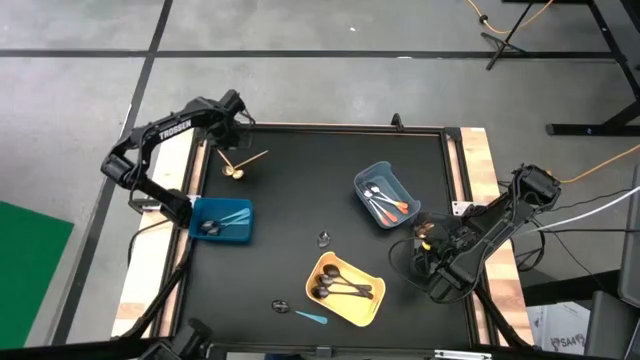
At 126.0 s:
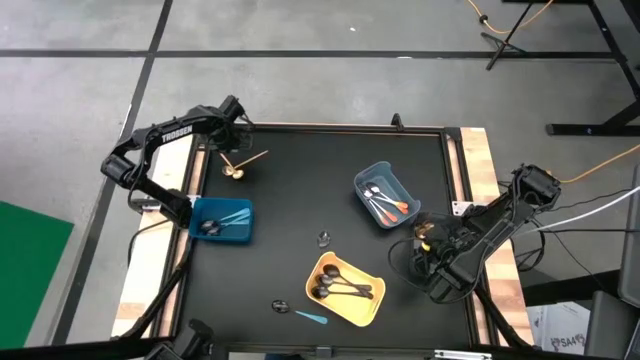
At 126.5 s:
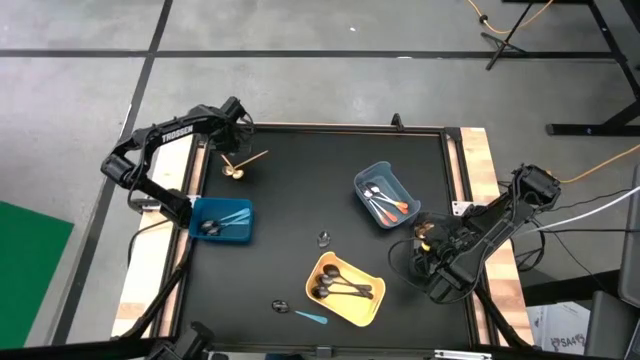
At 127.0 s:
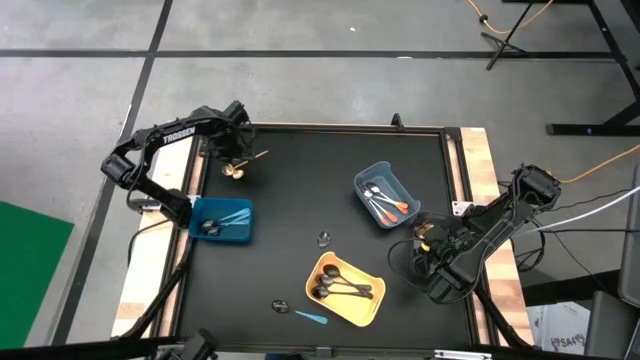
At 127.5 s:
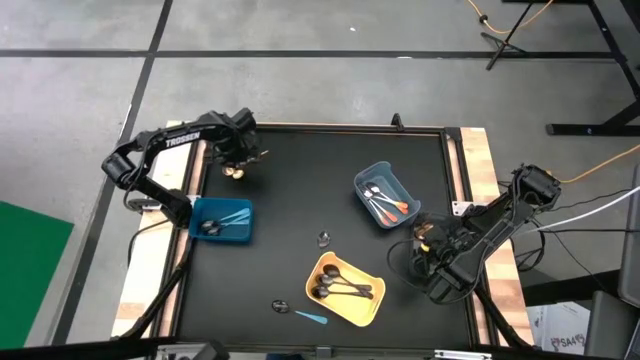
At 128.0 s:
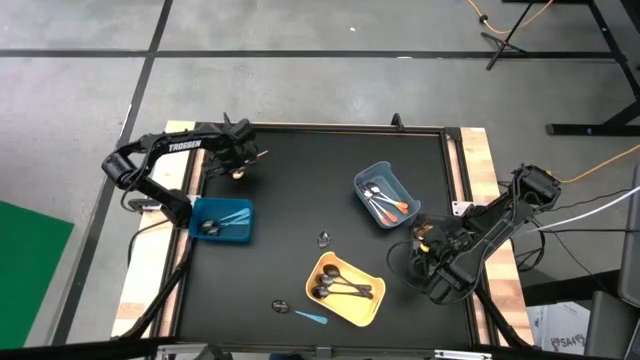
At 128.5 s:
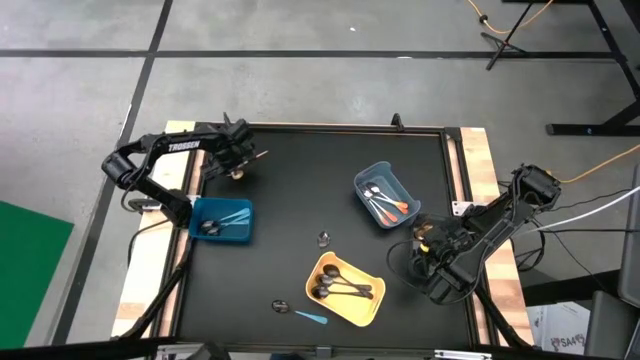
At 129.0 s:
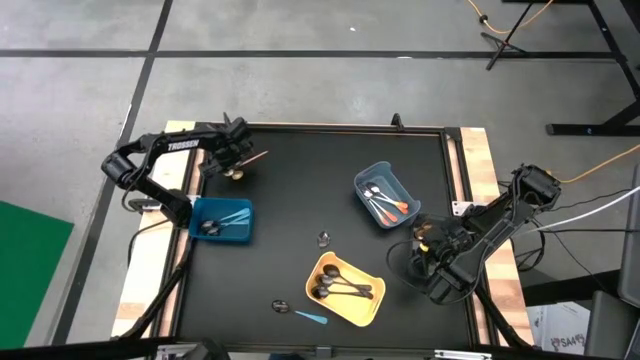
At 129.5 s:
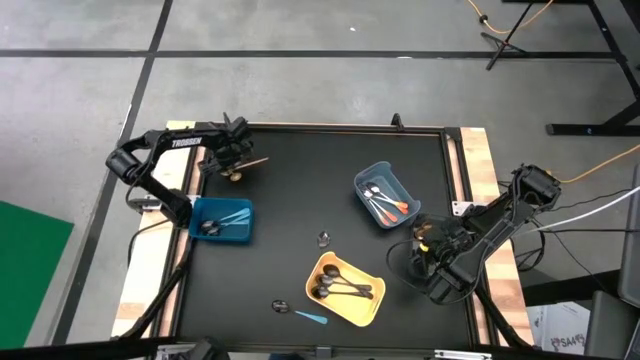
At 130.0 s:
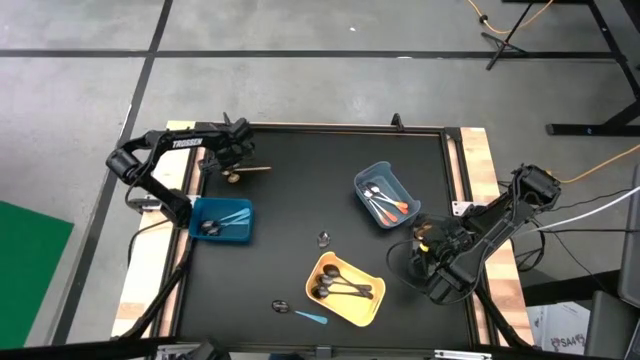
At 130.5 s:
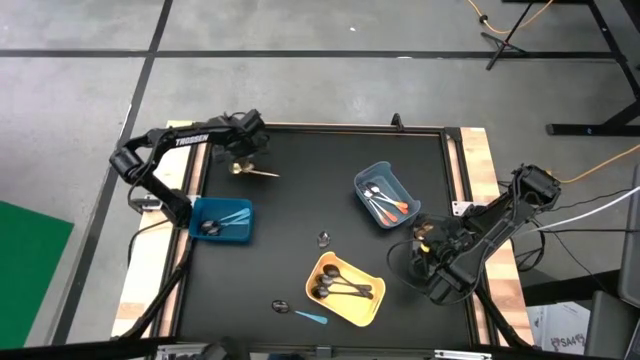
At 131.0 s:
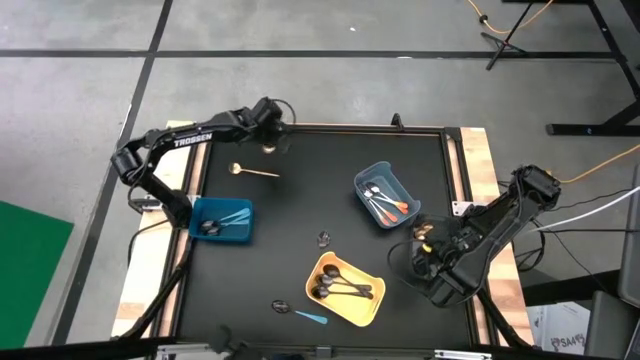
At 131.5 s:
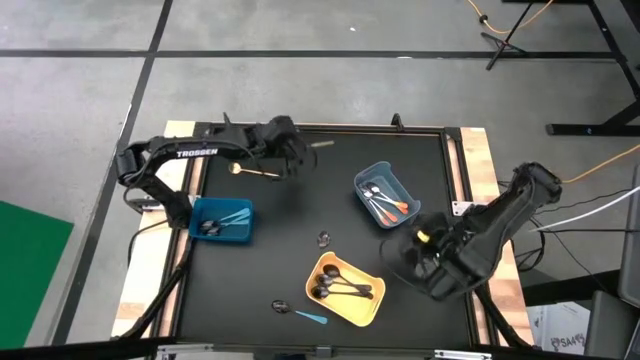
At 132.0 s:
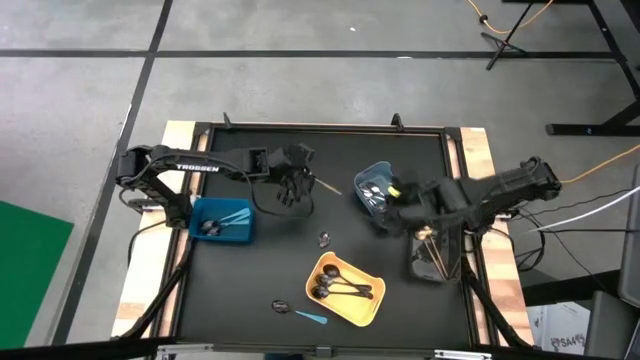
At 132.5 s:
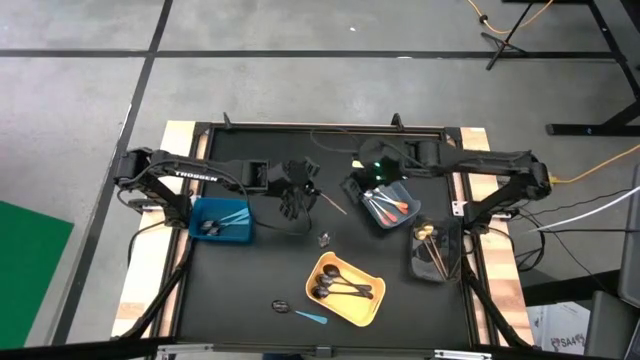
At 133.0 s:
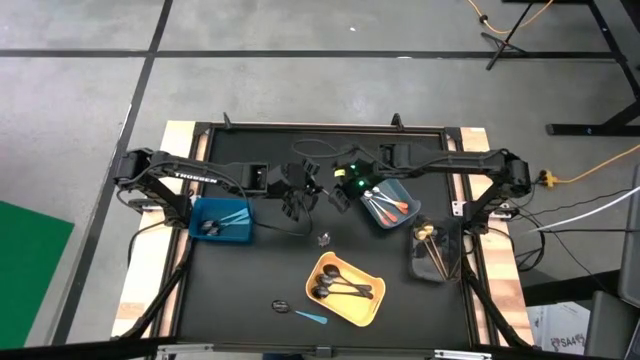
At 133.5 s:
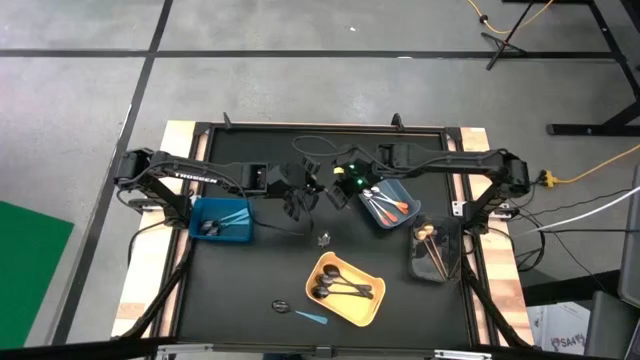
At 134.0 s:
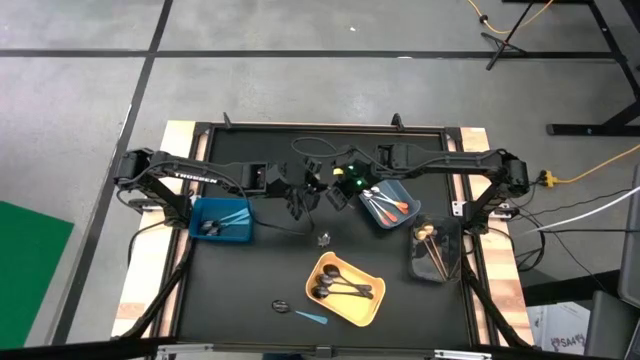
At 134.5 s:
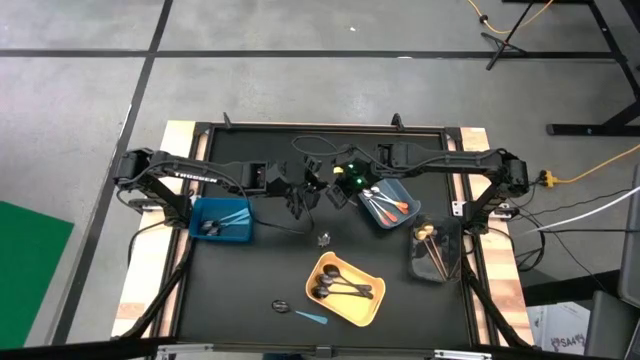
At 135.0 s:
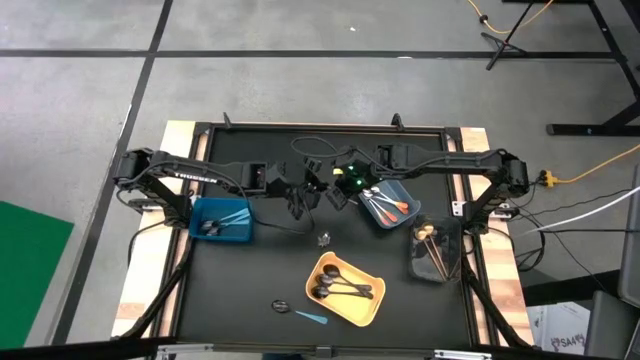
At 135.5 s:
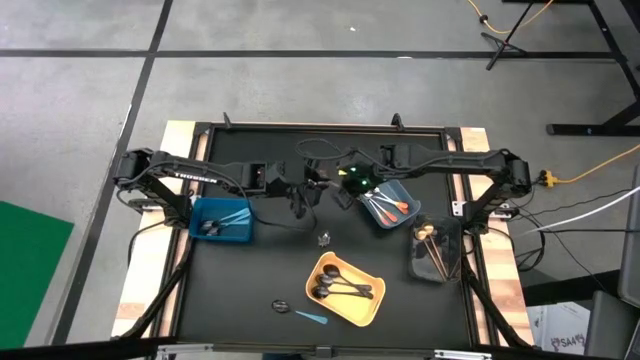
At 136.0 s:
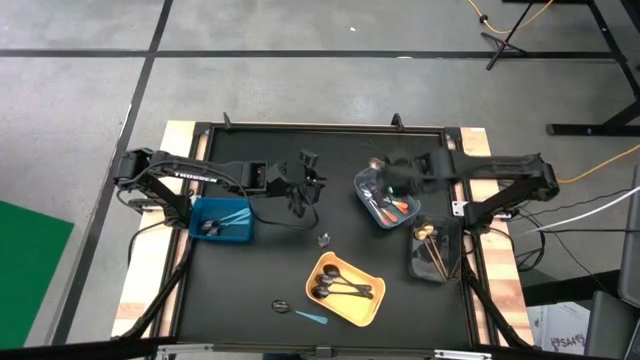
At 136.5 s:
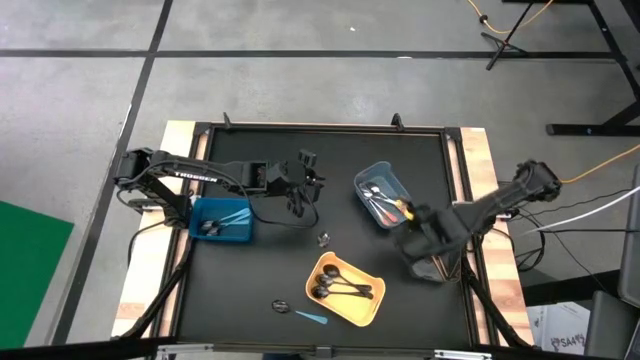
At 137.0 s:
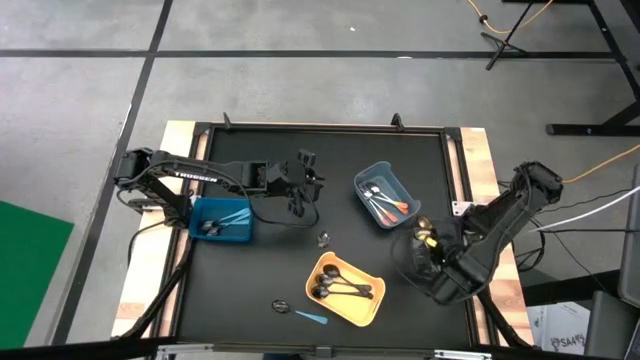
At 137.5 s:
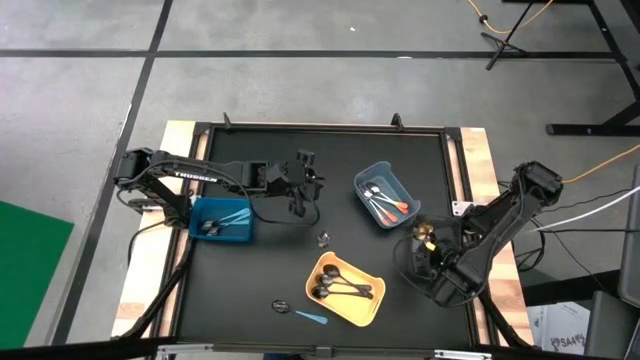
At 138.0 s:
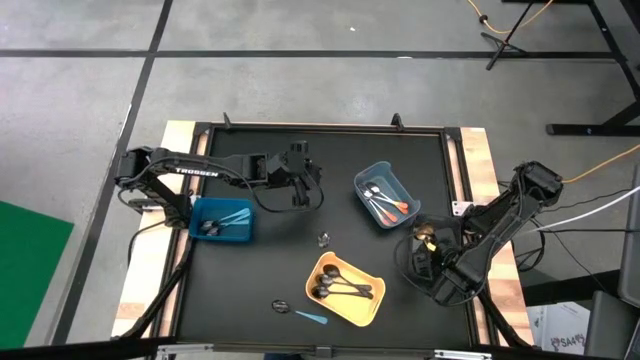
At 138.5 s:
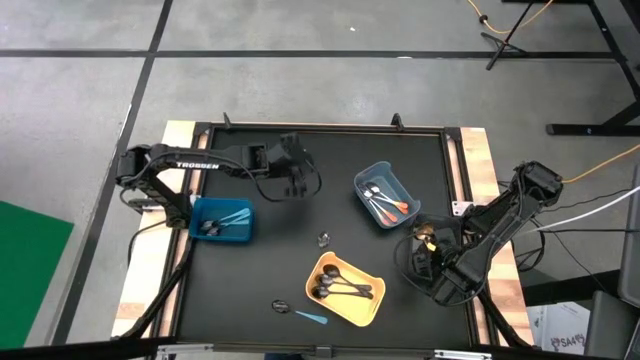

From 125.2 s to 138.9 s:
Task: Sort silverware by color (type)
Put the gold spoon into the black bin

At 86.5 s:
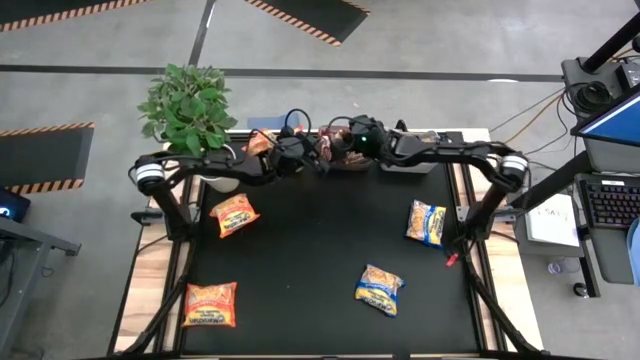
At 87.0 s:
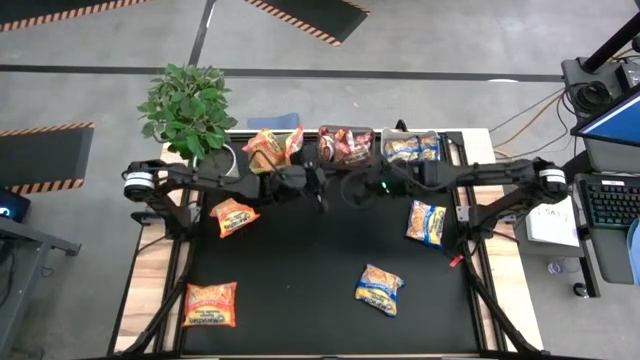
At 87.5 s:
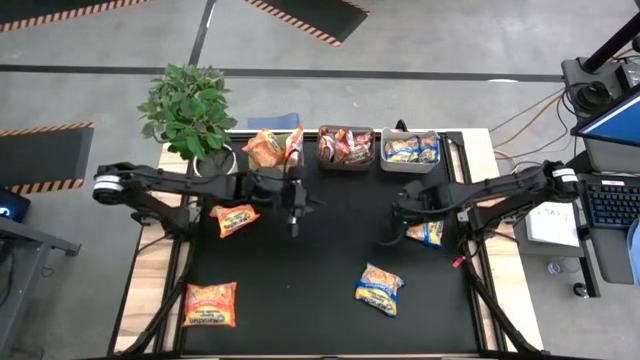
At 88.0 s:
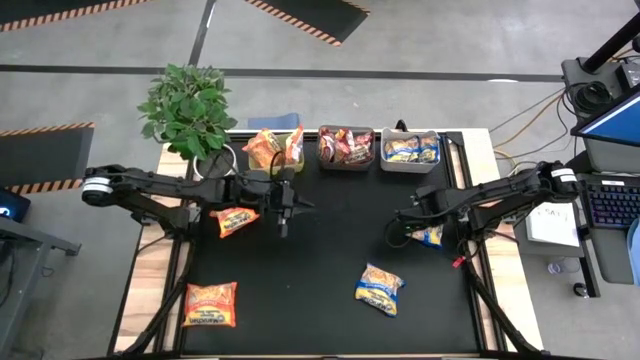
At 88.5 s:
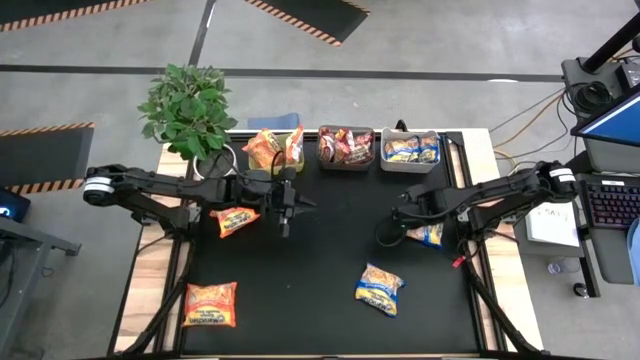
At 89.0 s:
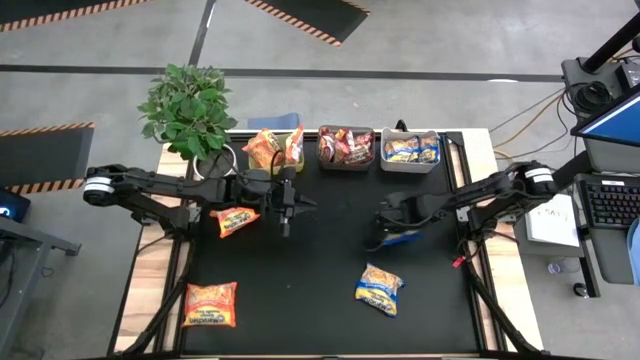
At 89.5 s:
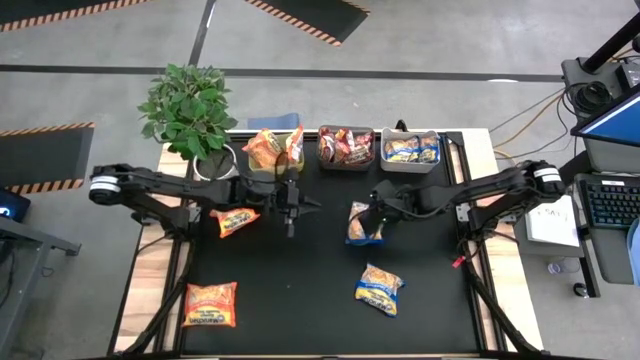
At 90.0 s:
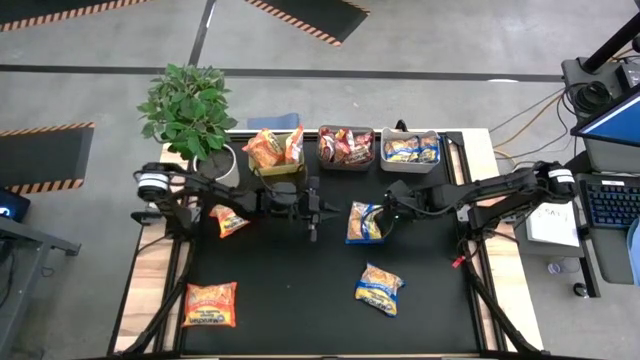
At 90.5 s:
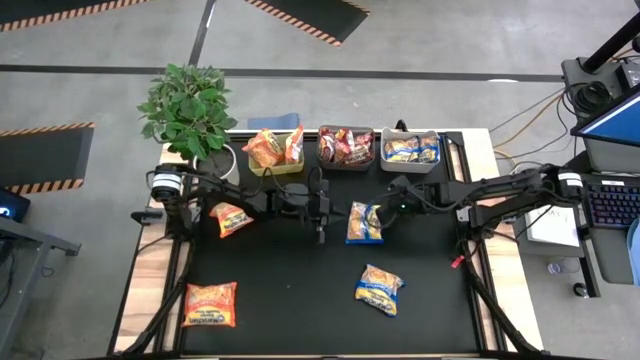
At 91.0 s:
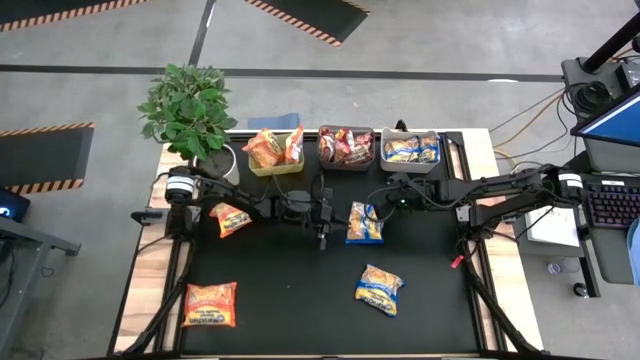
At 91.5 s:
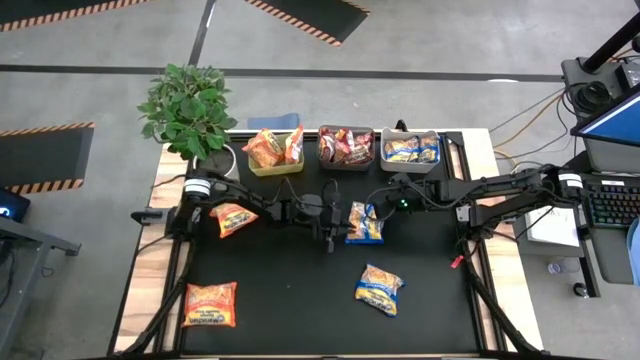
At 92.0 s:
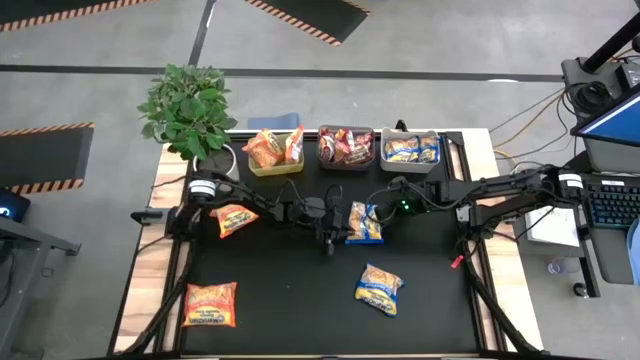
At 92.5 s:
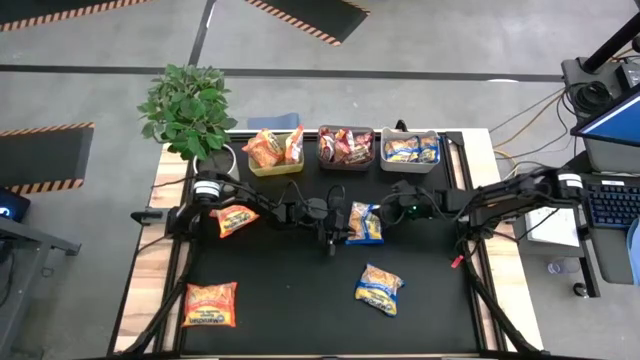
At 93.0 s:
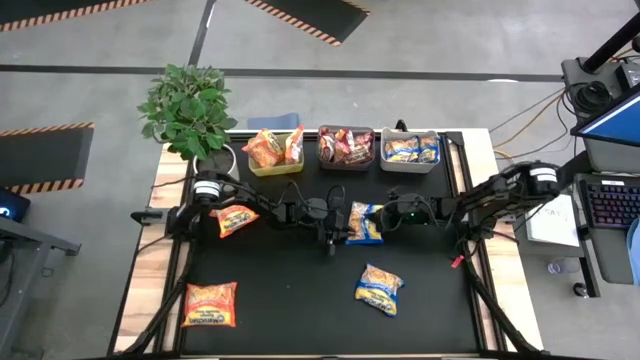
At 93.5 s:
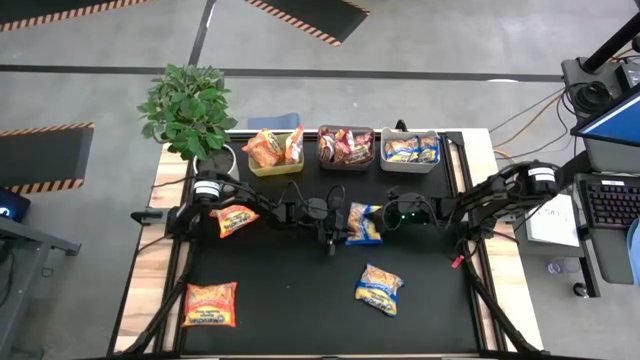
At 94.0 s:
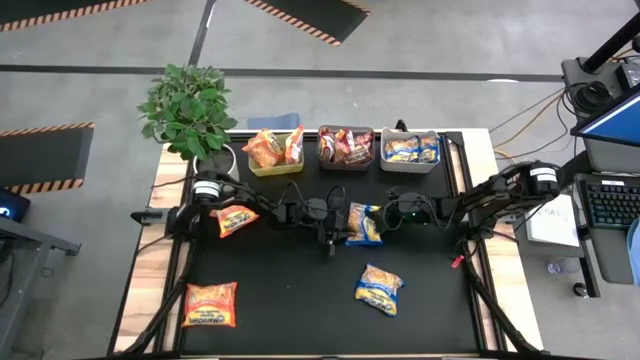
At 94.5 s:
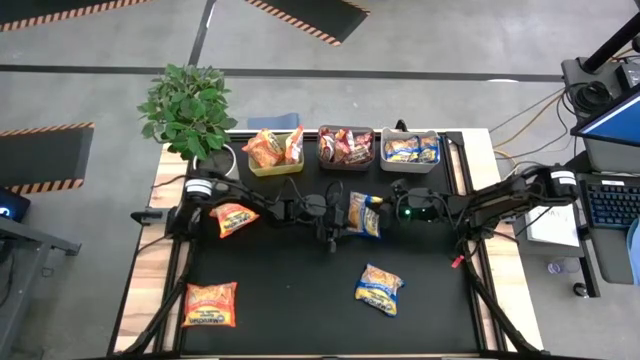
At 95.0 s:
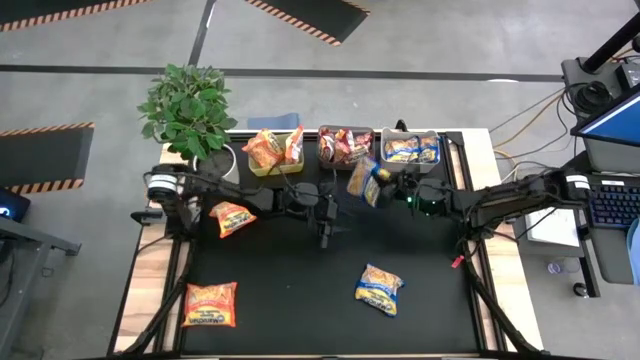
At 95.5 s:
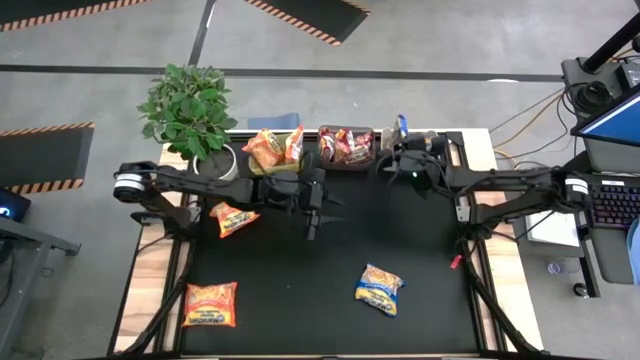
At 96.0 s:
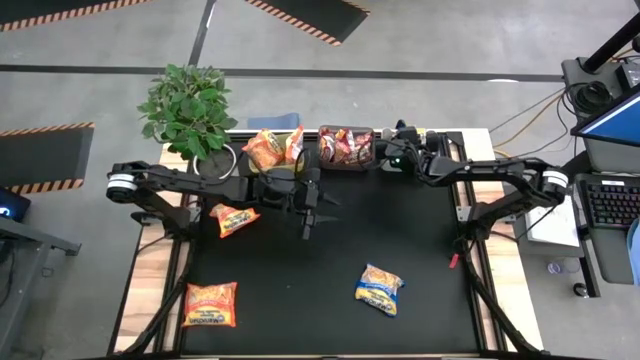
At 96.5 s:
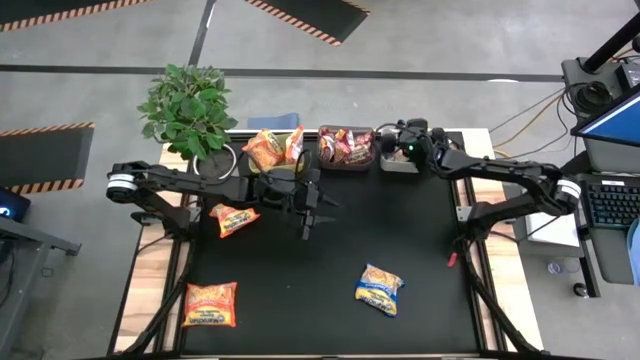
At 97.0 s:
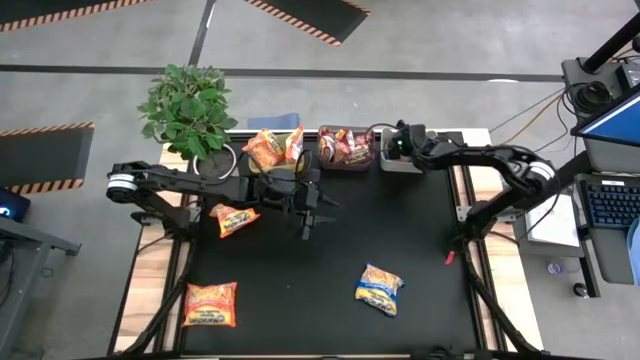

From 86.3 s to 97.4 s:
Task: Sort Maruchan noodles
Put the top blue noodle pack into the white bin
